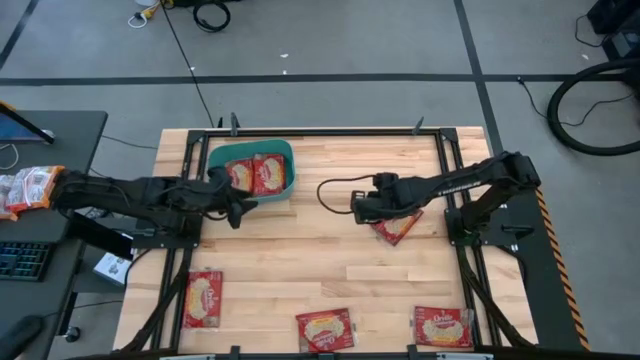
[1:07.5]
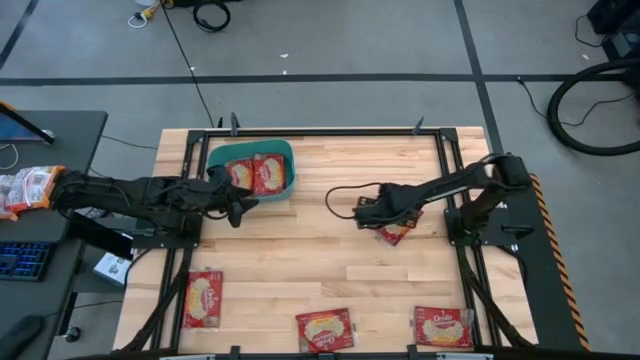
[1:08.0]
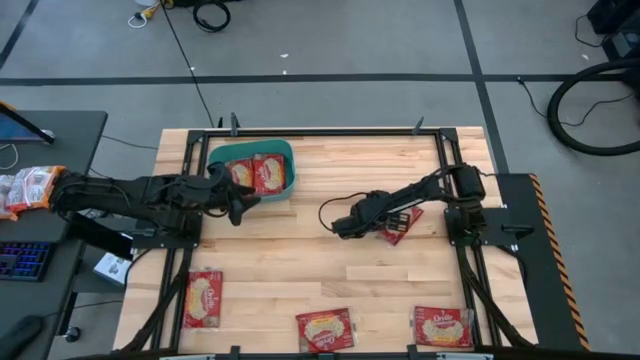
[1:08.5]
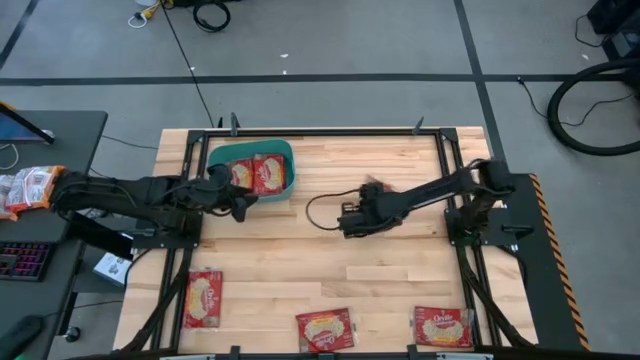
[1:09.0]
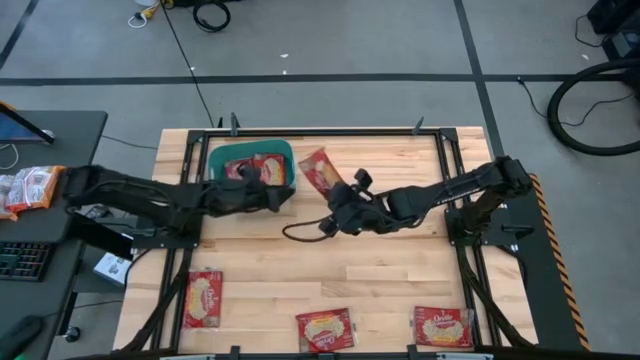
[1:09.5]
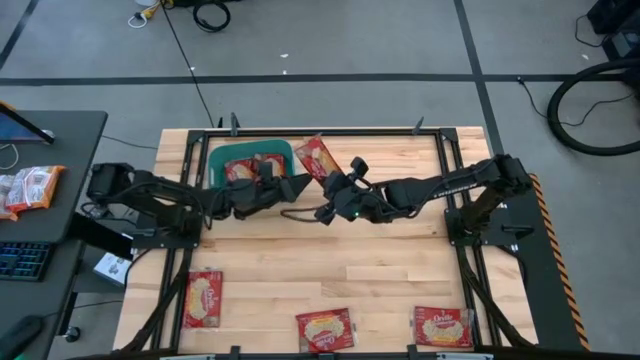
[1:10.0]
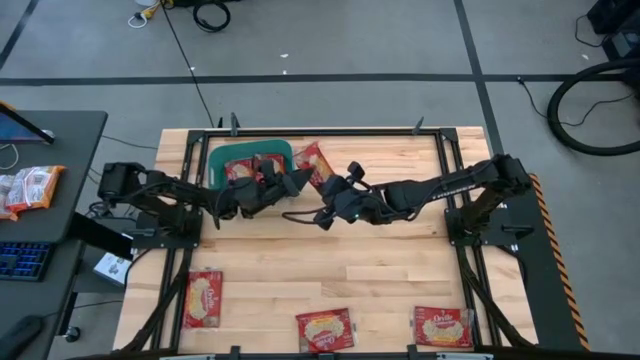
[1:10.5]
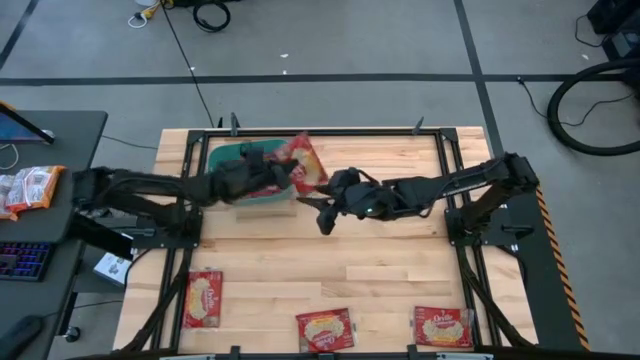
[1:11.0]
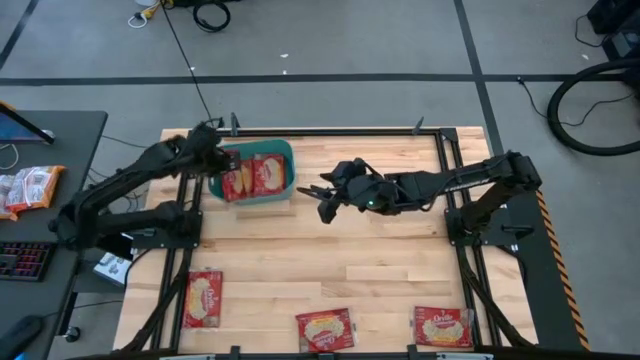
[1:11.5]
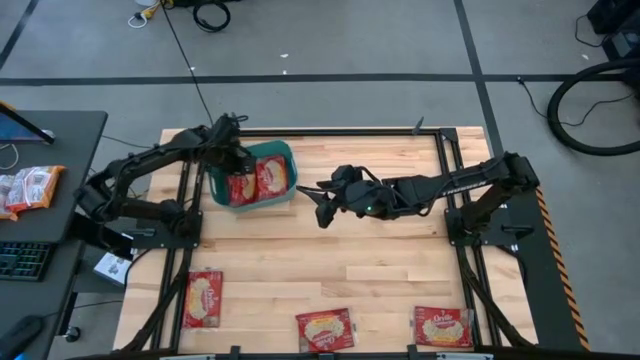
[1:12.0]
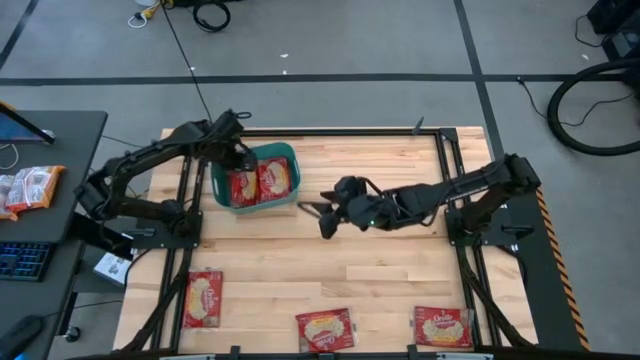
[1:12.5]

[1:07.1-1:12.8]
Task: Sort popcorn bags into baskets
Put the popcorn bag into the green bin

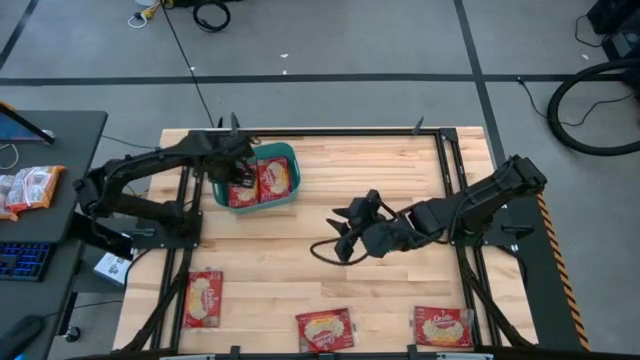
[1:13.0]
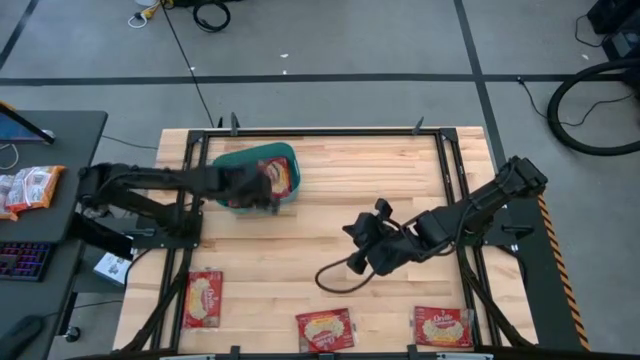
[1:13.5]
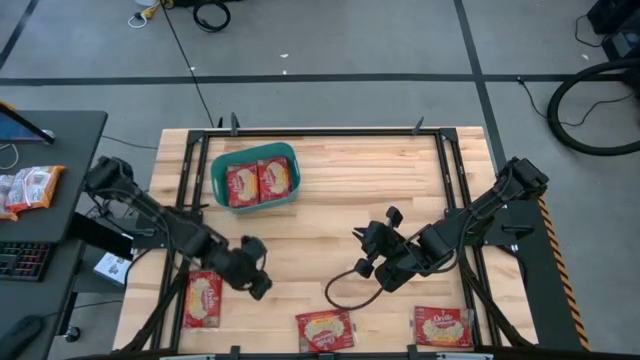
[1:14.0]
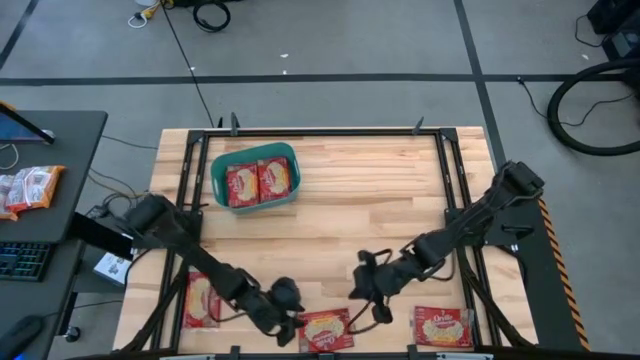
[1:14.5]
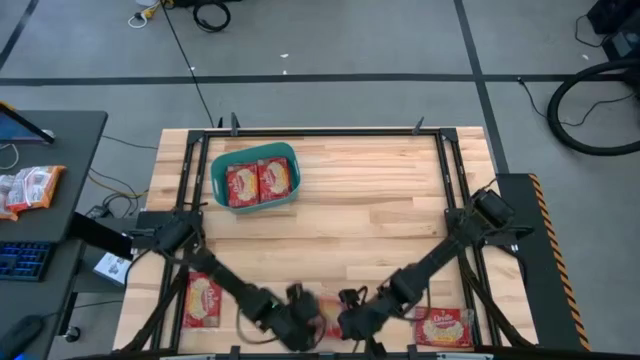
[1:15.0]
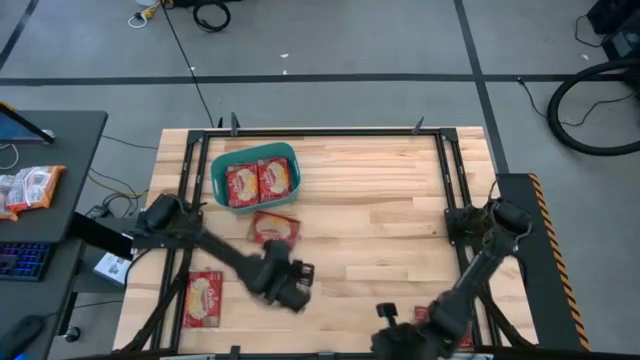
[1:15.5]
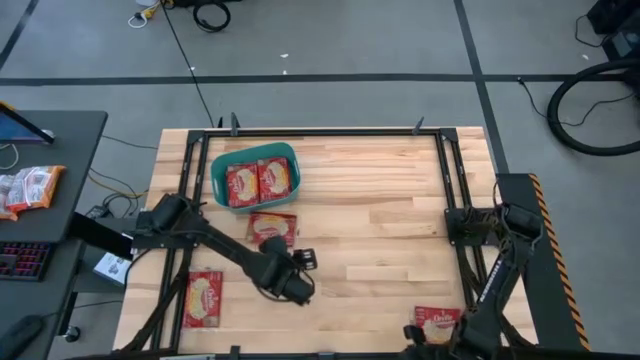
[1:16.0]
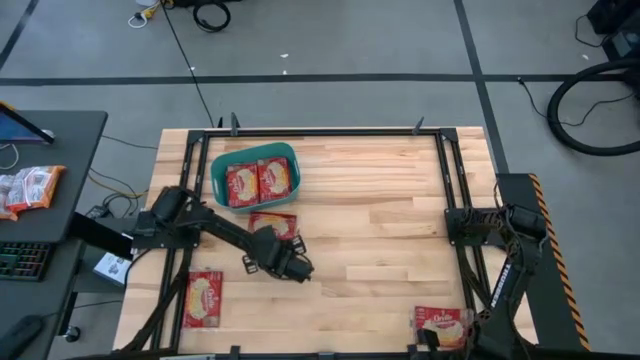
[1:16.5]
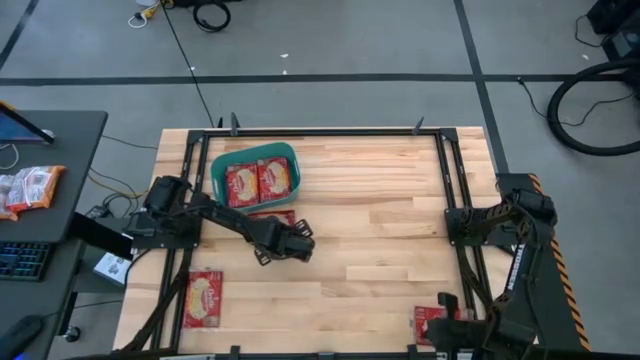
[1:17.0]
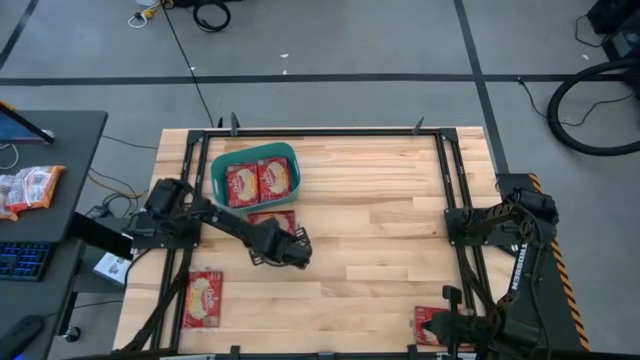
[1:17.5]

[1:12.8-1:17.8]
Put the popcorn bag into the green bin

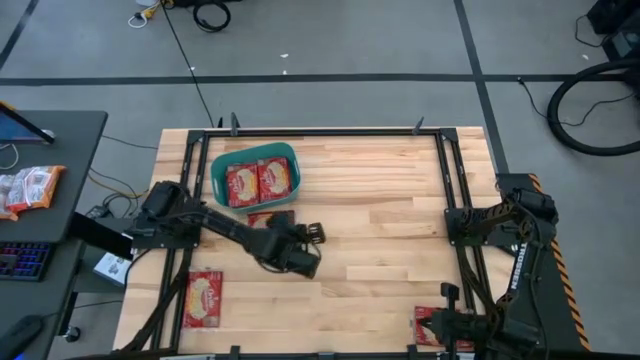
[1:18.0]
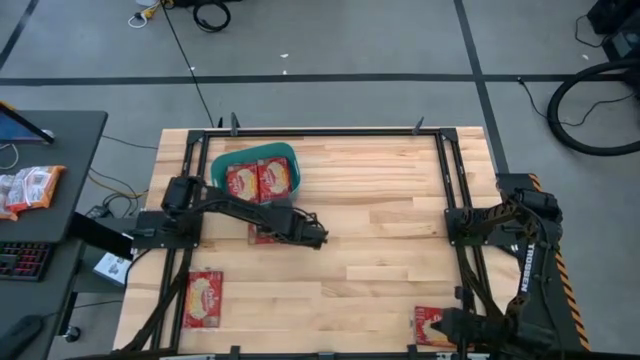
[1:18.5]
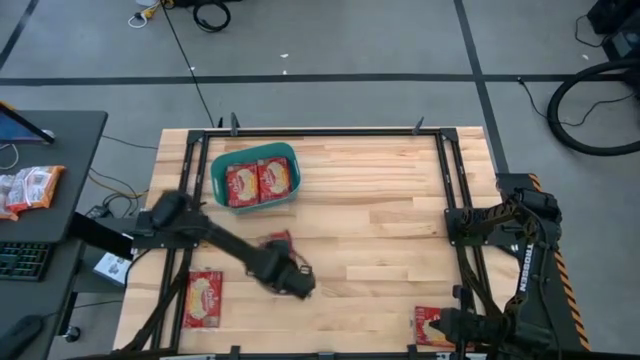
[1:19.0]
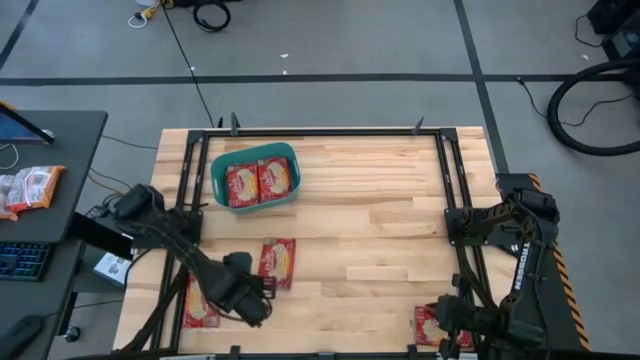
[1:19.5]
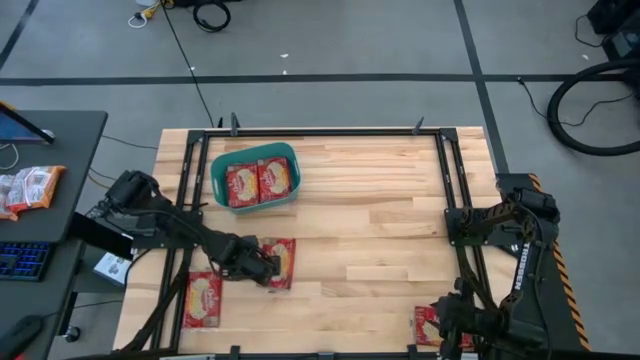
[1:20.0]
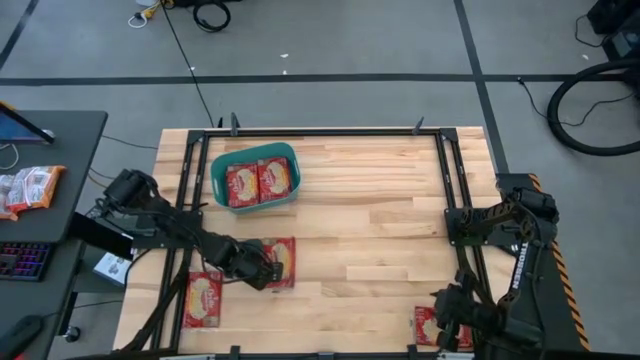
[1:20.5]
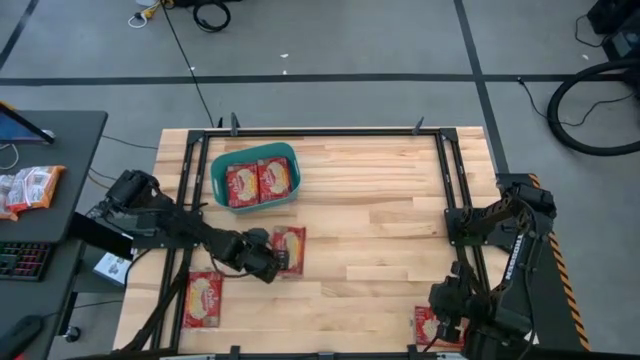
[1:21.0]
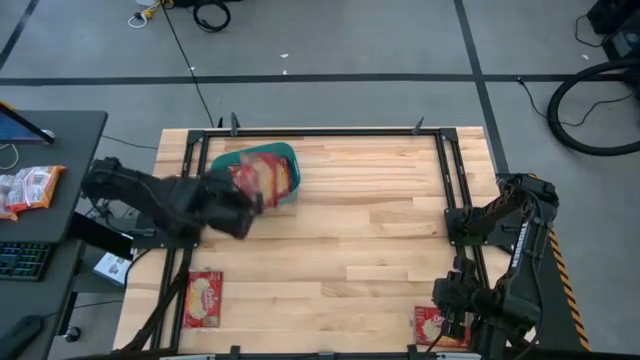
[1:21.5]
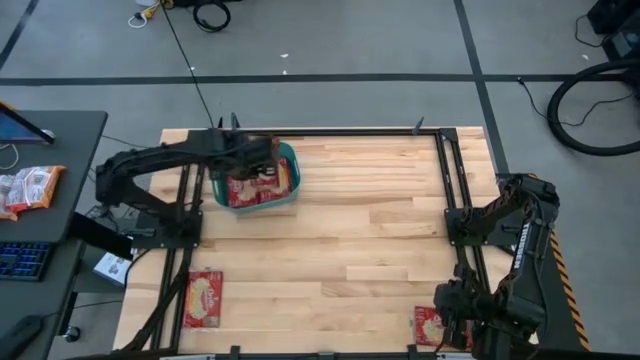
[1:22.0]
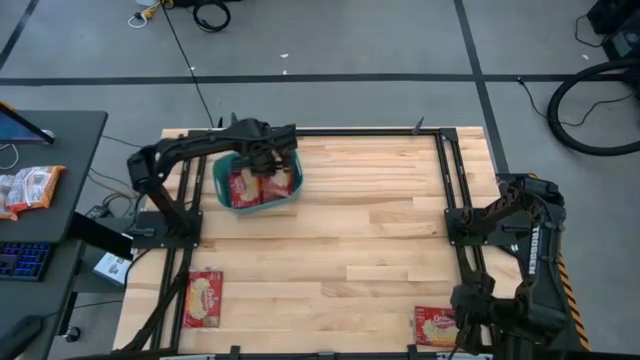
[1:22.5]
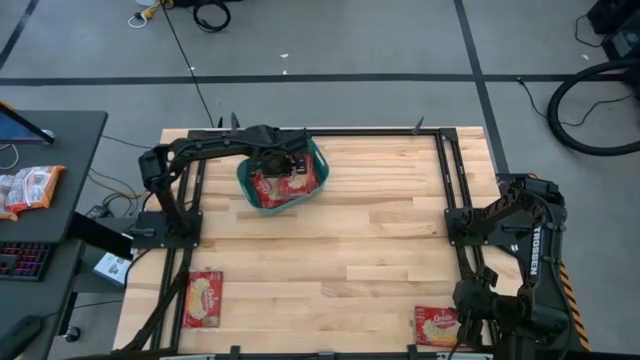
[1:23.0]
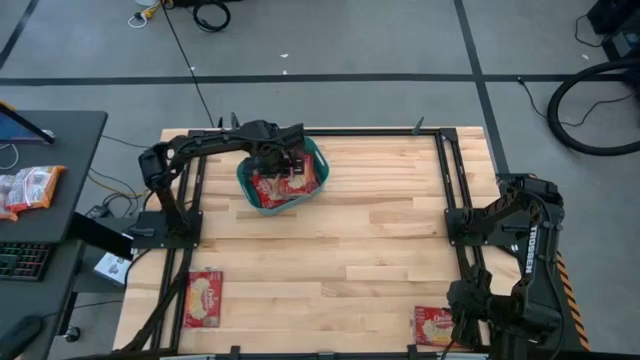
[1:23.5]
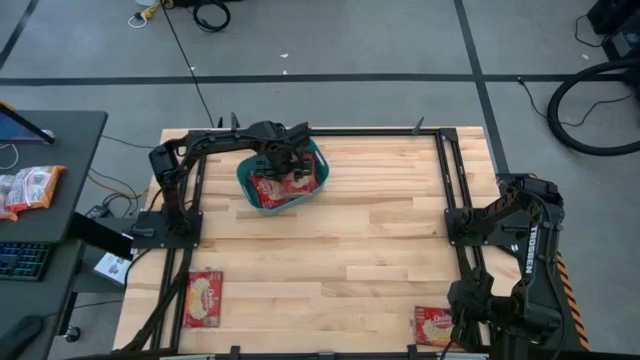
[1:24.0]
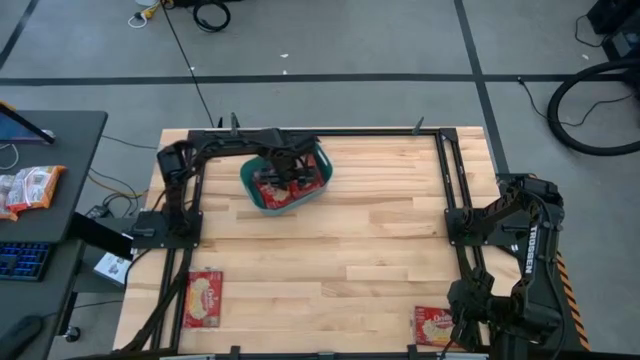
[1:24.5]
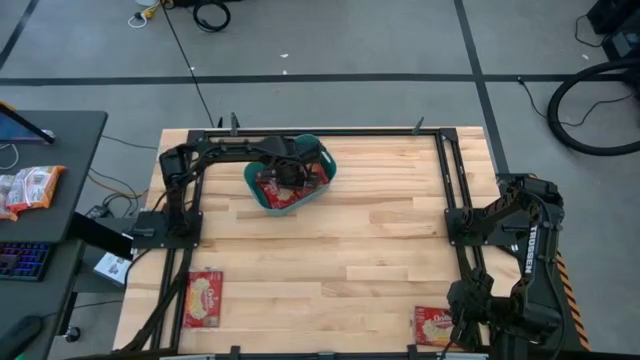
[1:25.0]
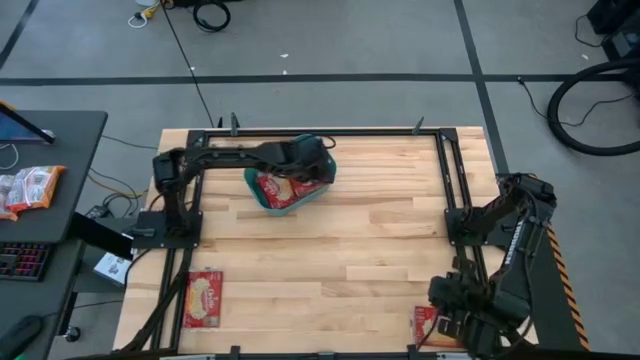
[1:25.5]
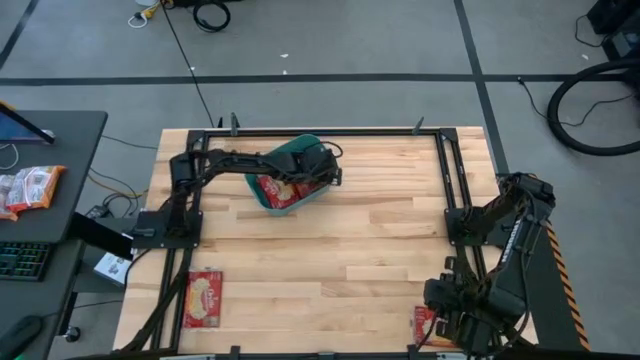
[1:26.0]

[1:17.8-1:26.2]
Put the popcorn bag into the green bin

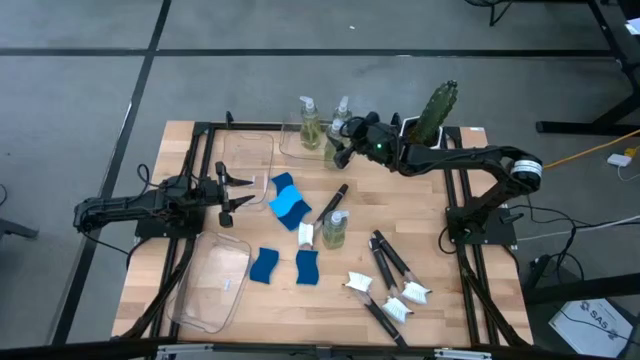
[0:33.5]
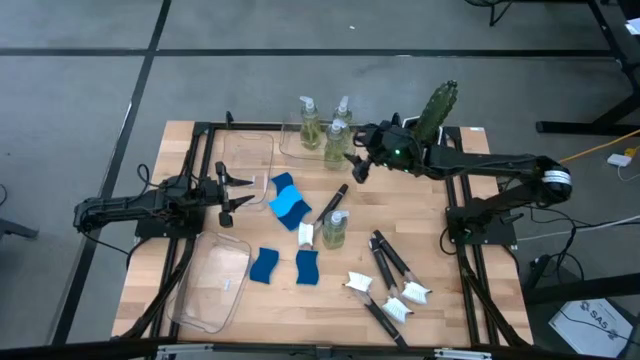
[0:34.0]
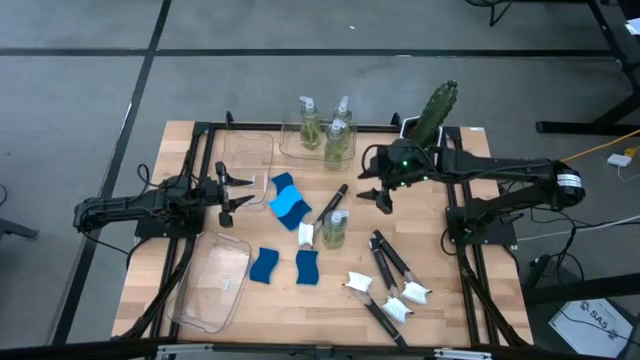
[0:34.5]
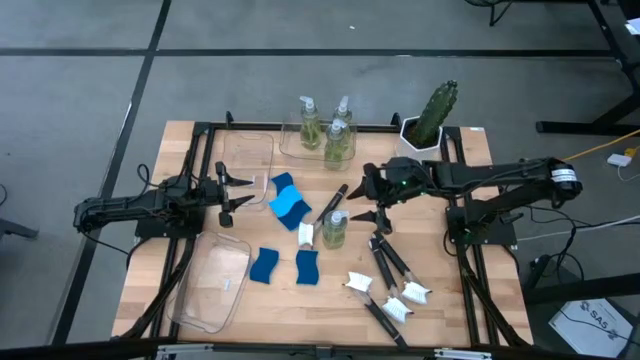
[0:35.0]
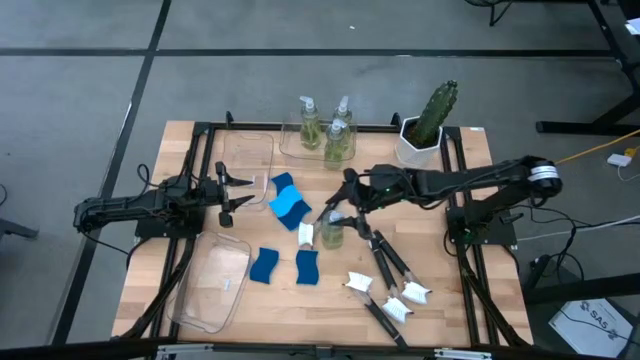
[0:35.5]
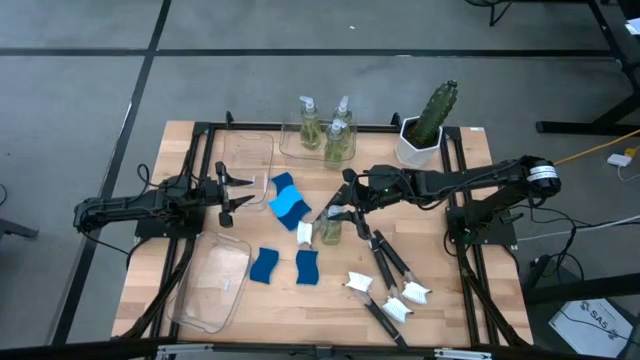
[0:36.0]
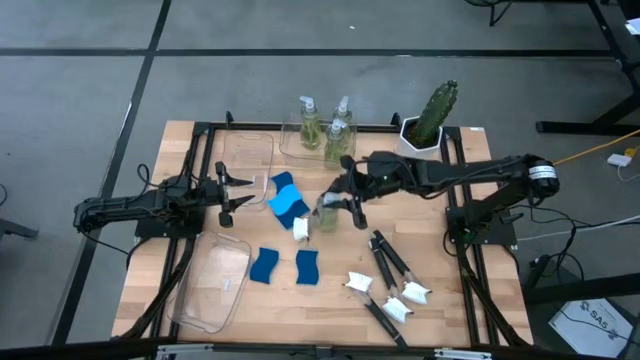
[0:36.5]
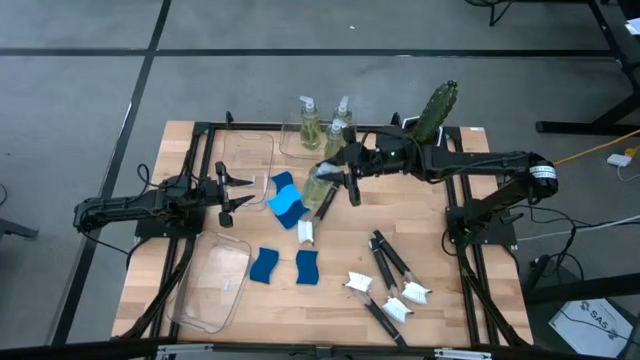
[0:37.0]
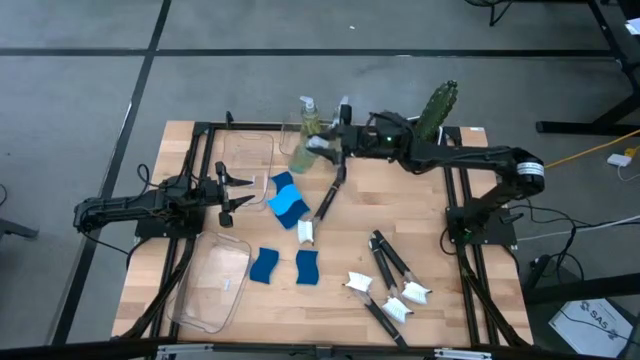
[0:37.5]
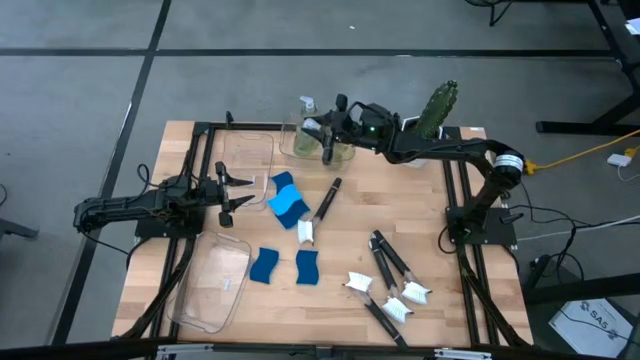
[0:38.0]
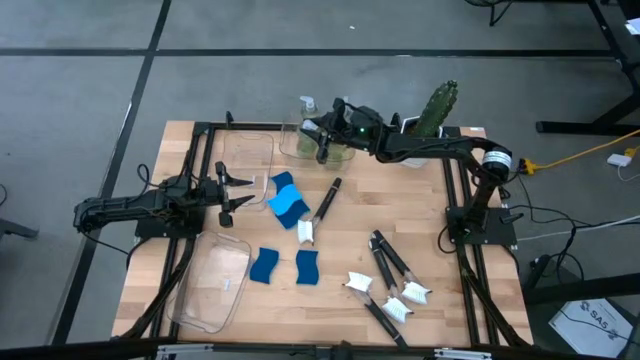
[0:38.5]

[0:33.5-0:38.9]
Task: Pick & Place Kitchen Sink Supplies
Put the yellow soap dispenser bottle into the top right transparent bin
